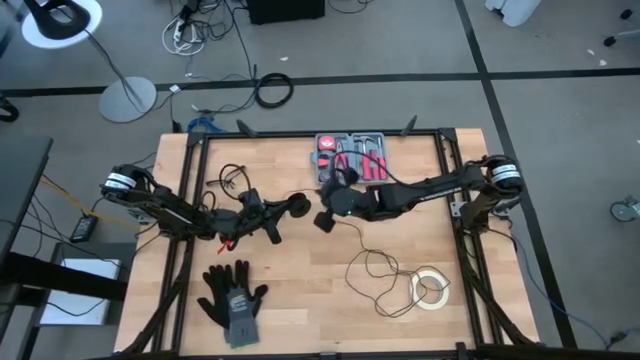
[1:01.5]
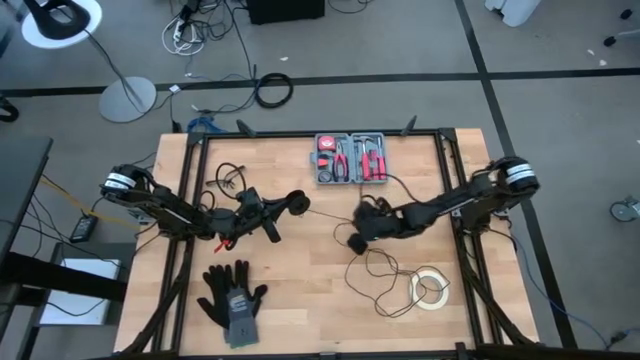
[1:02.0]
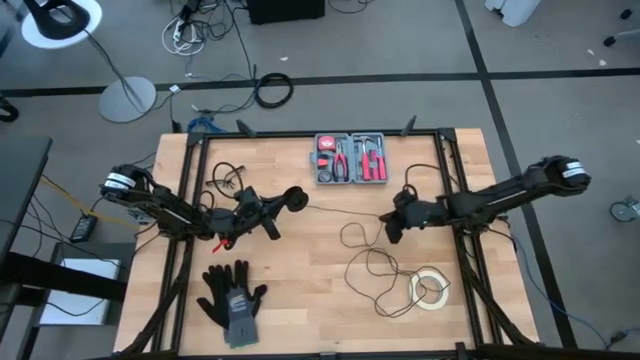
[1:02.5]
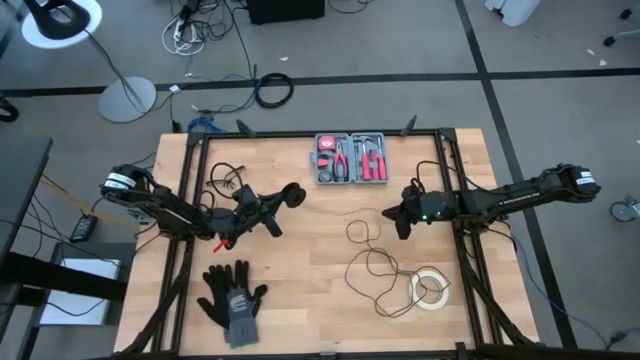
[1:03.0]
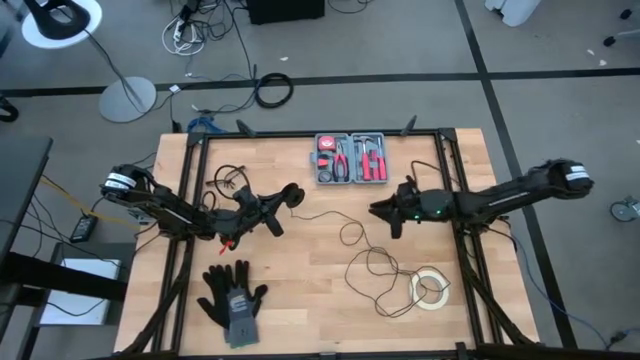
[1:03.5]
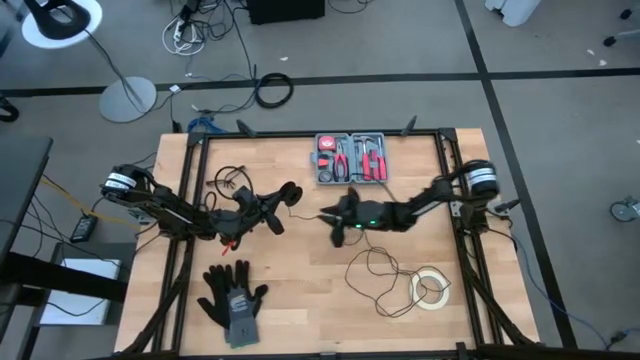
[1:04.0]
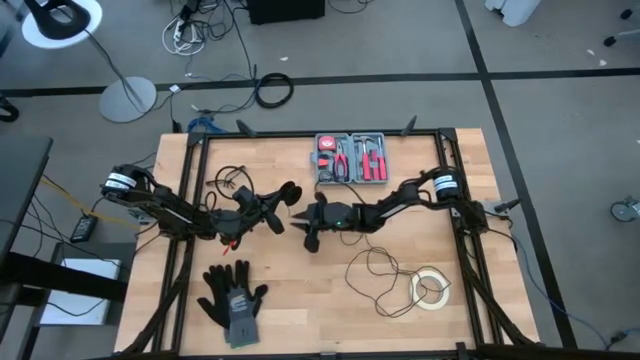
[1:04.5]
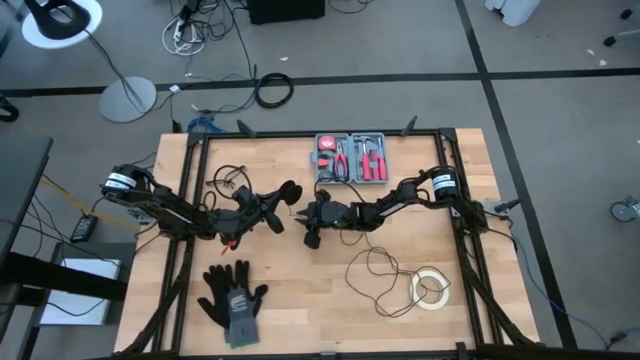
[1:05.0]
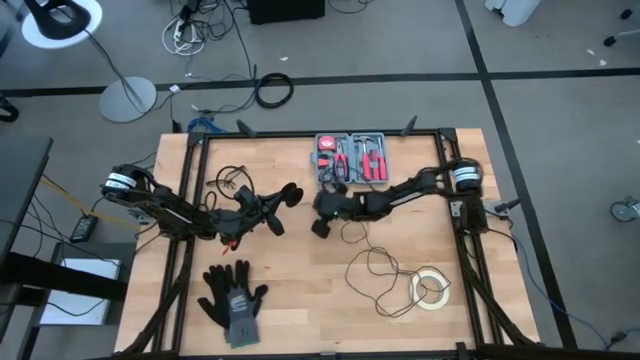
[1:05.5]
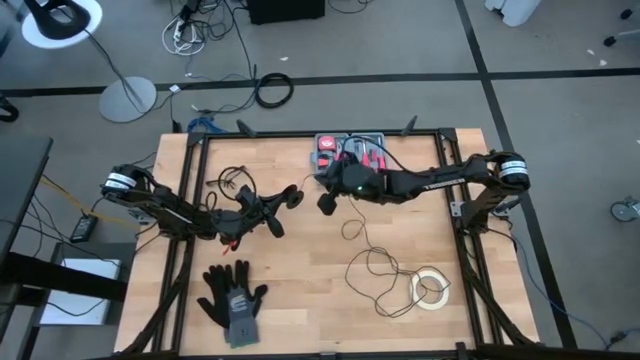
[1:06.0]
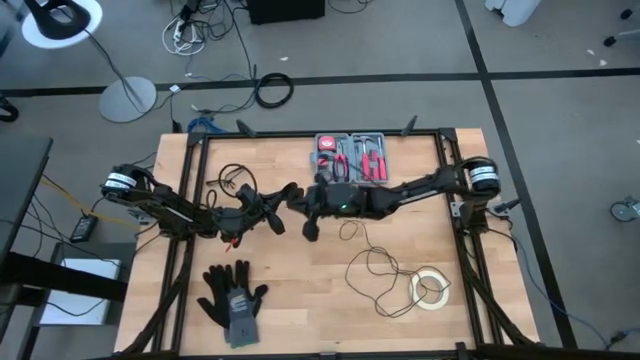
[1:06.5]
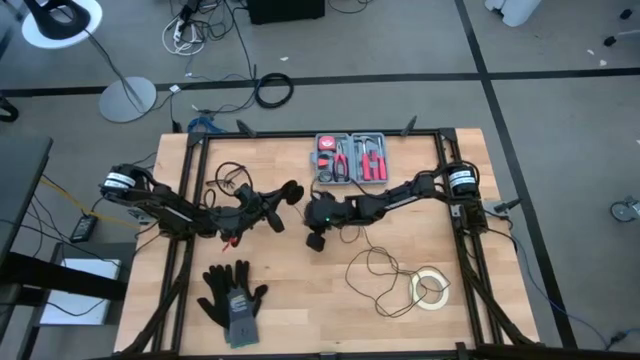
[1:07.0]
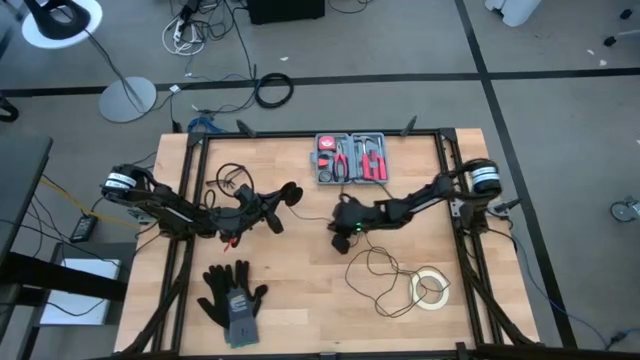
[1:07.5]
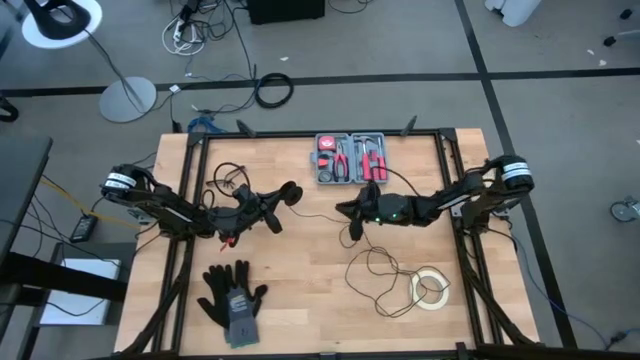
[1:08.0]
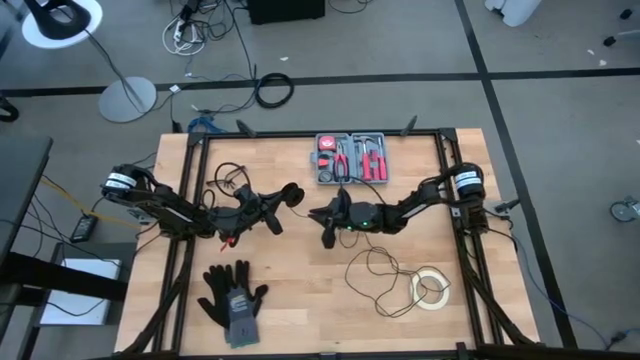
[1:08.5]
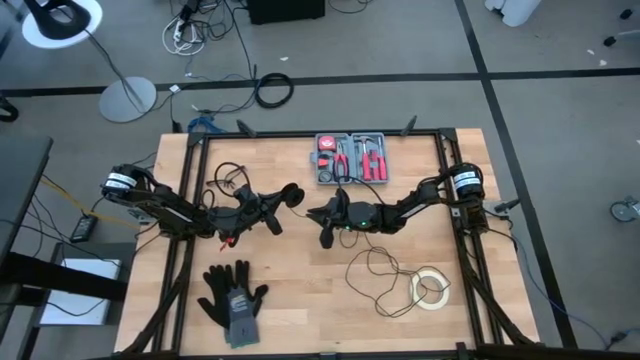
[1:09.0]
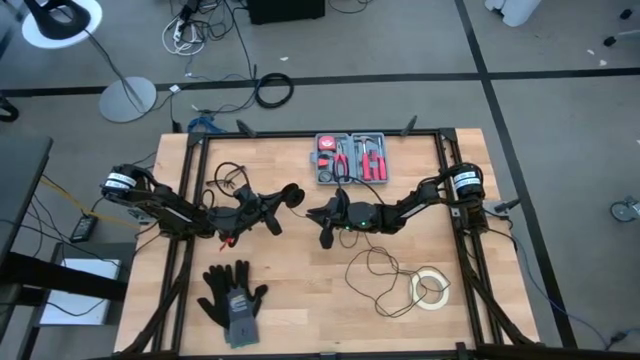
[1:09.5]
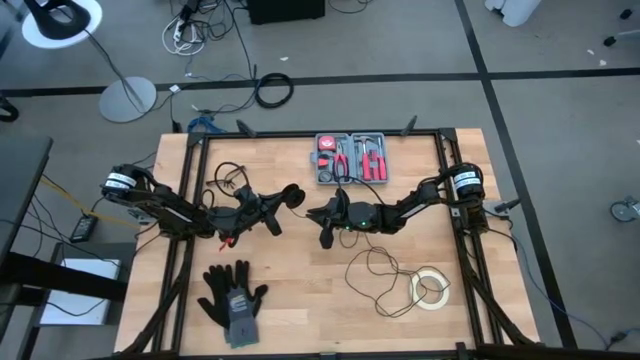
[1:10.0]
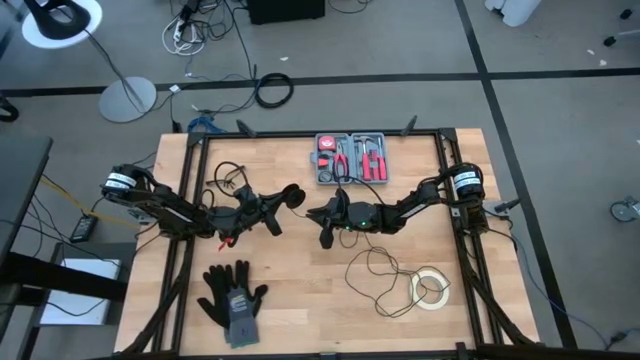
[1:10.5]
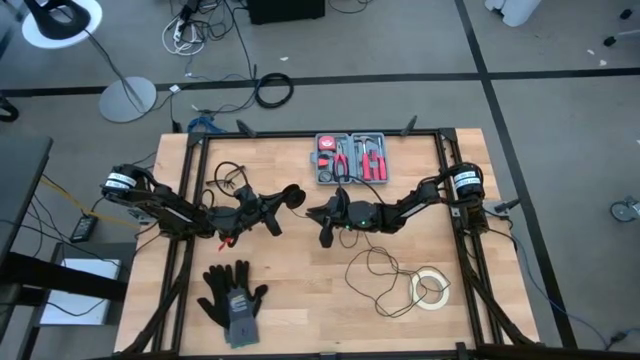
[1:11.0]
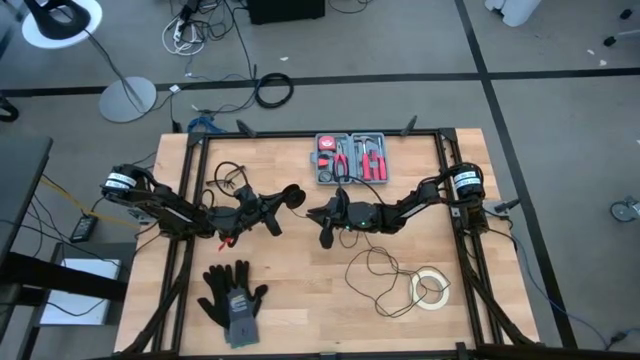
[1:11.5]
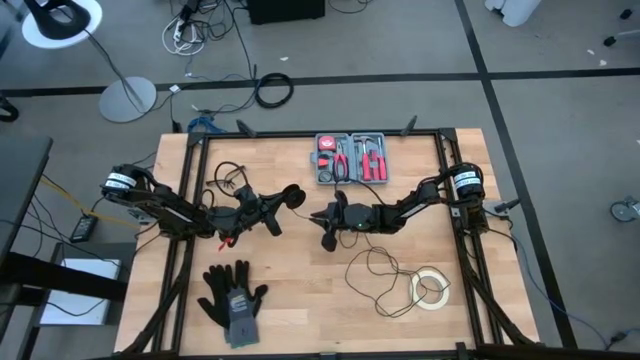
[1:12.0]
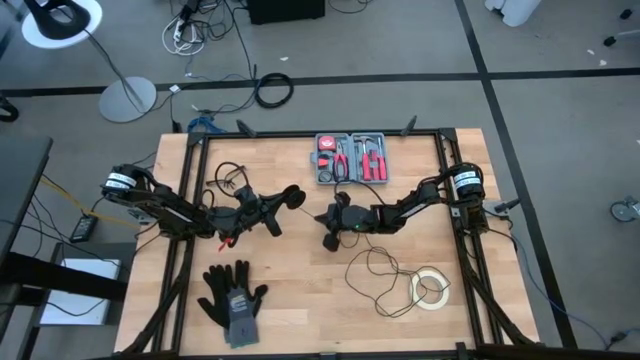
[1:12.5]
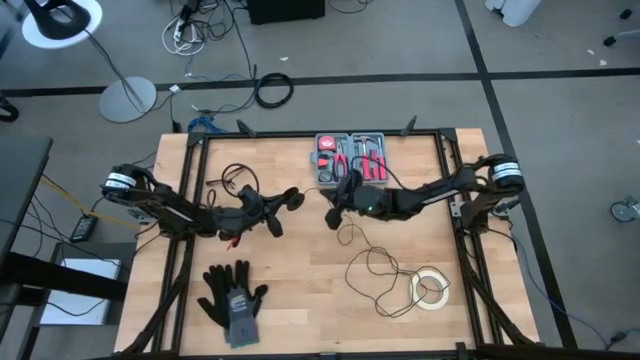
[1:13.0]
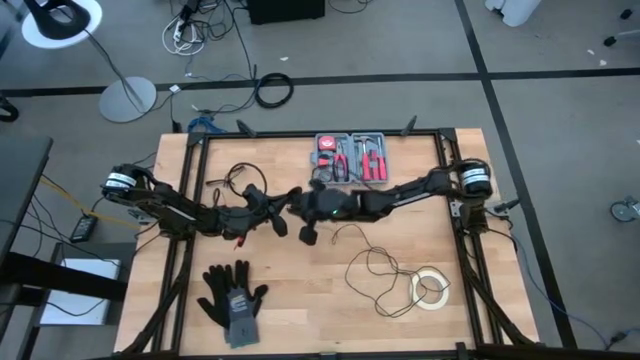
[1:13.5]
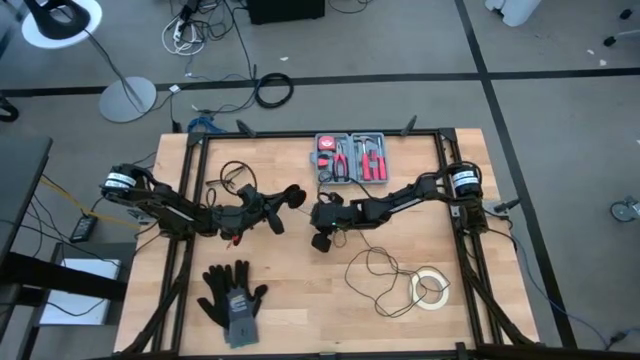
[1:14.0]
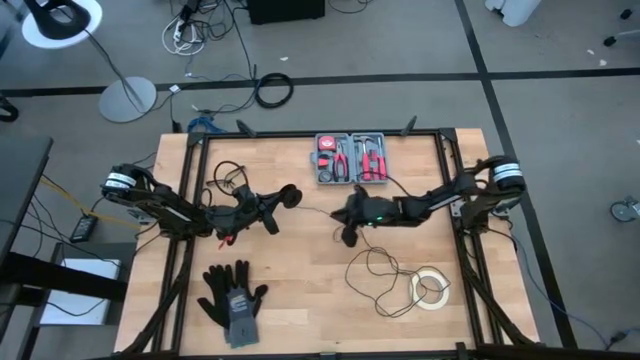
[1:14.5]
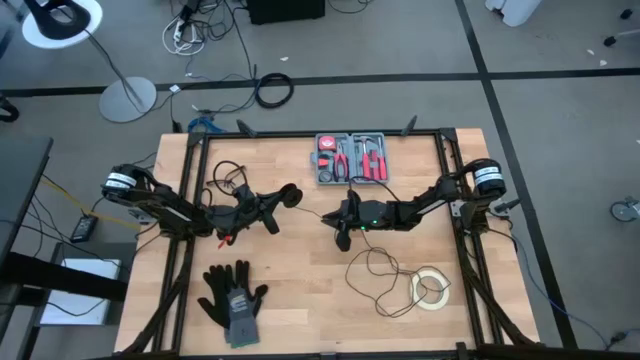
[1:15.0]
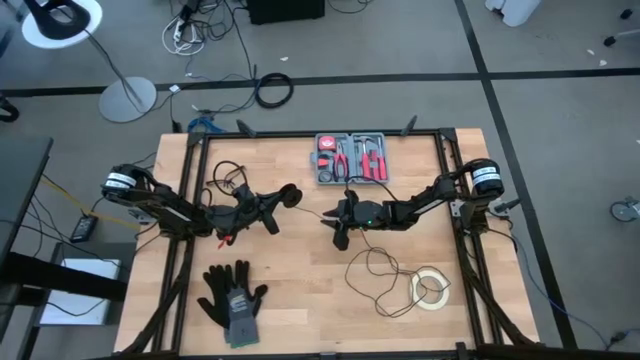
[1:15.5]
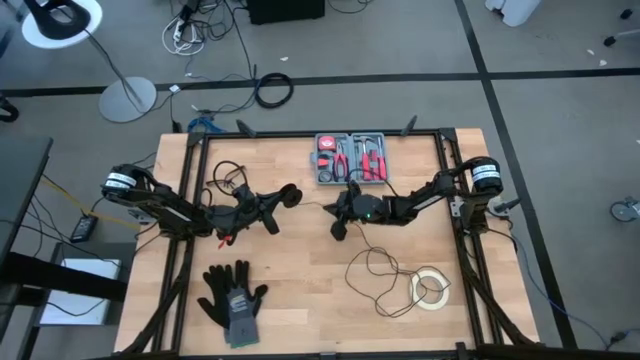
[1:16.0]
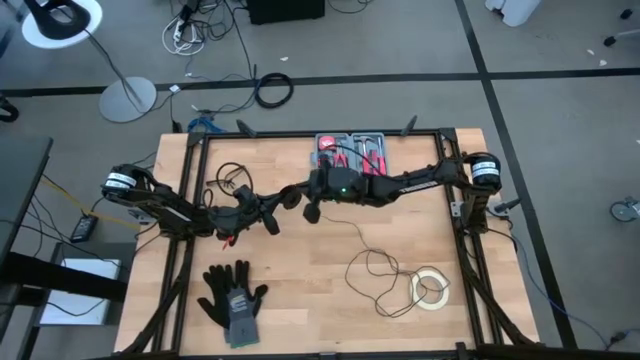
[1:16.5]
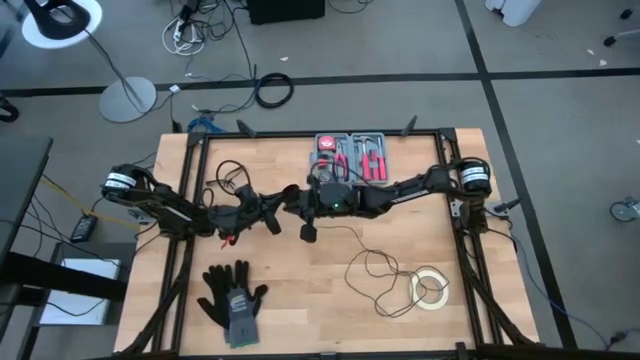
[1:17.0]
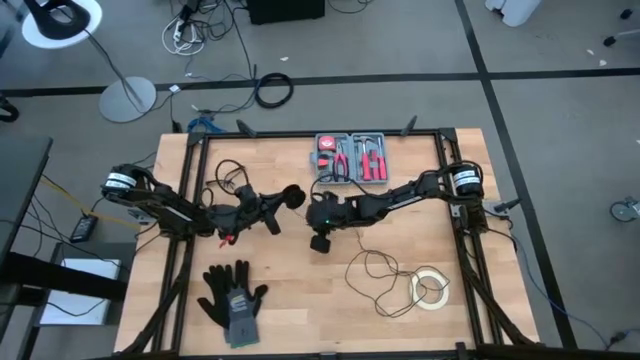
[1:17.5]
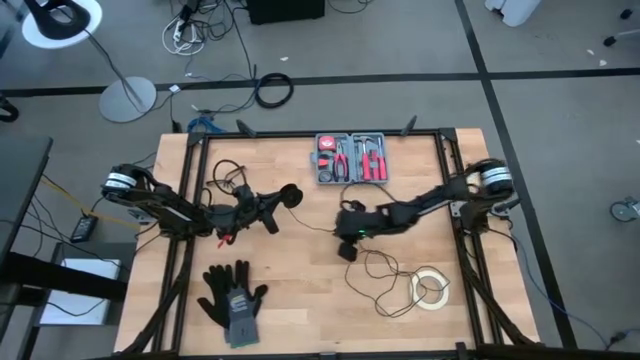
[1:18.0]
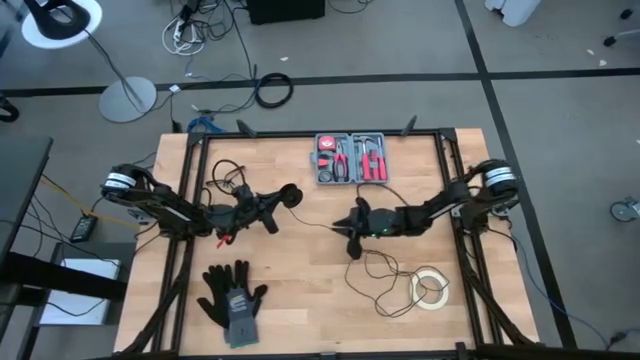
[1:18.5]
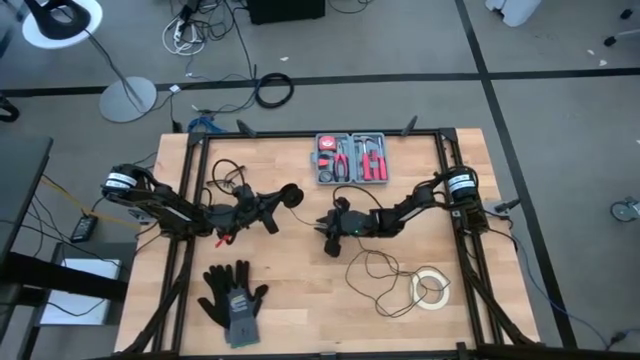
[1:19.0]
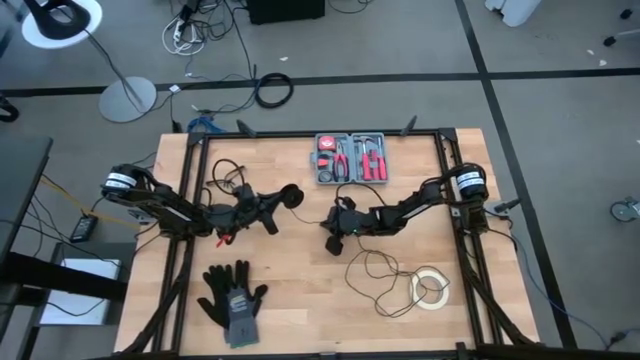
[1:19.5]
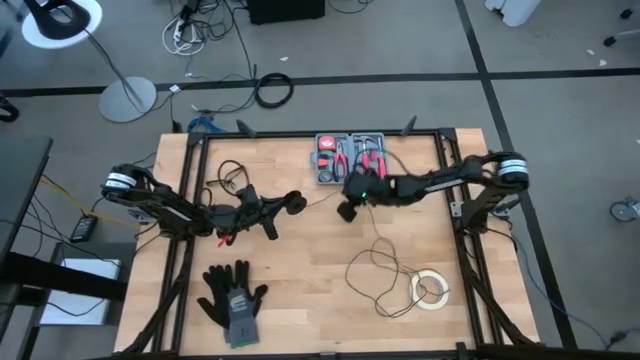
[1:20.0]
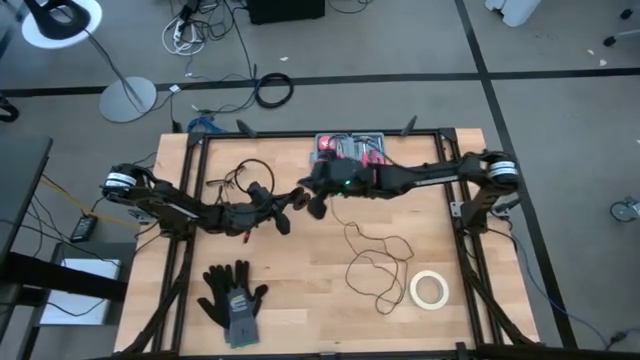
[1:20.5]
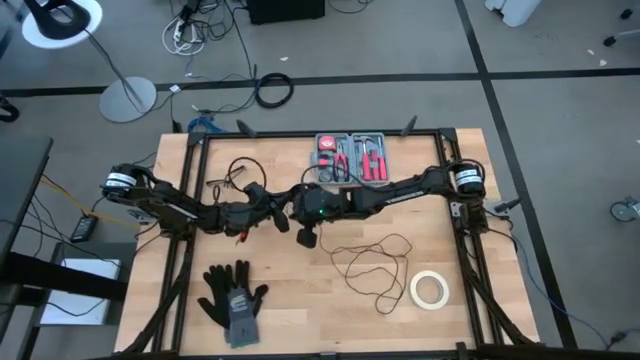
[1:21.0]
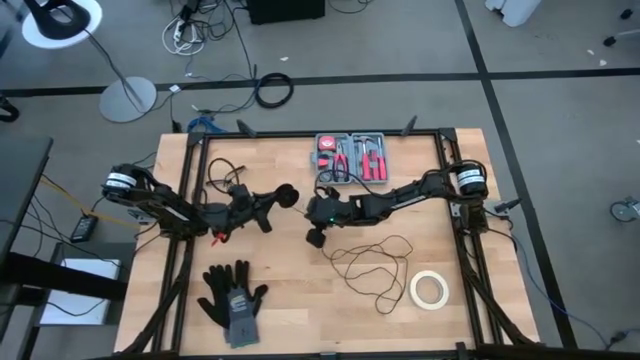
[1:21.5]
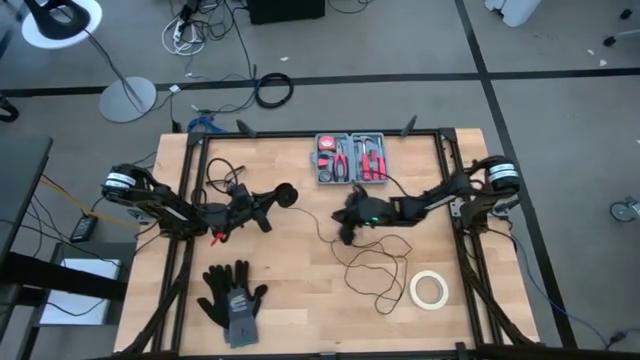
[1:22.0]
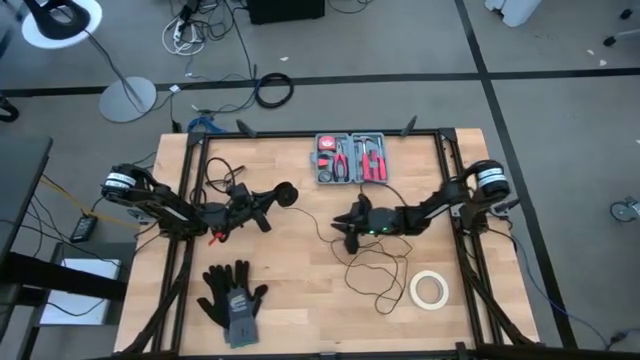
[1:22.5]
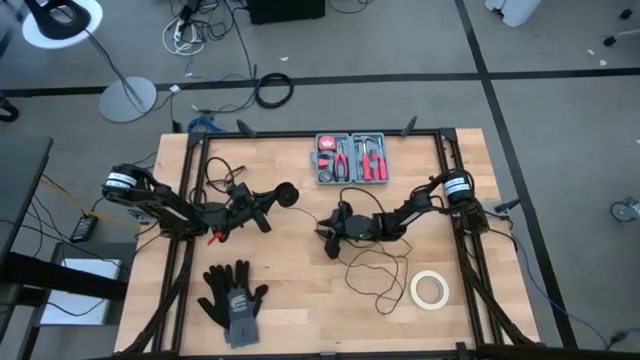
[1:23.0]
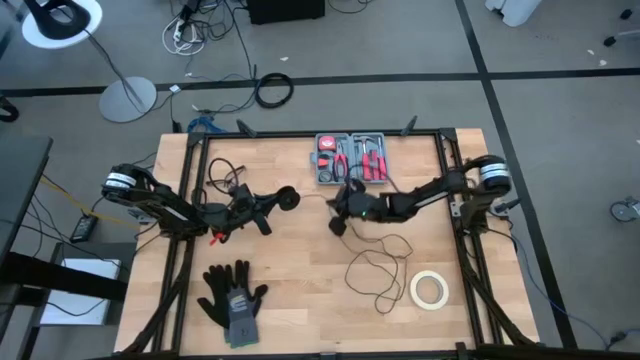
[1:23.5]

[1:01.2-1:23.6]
Task: Coil cords
Coil the black wire onto the black spool
